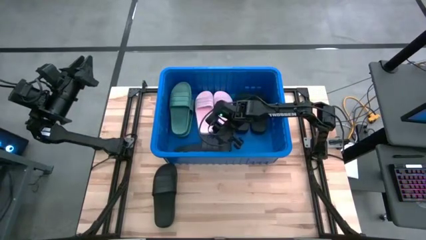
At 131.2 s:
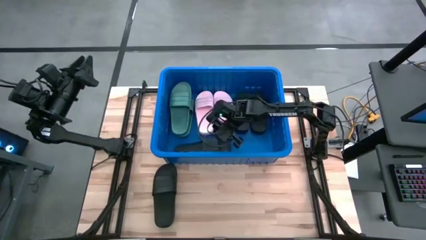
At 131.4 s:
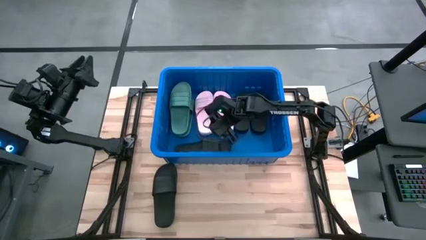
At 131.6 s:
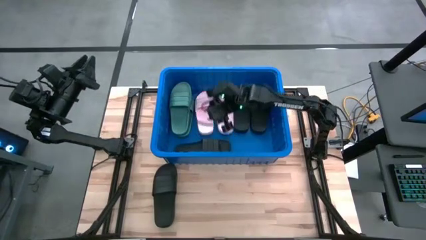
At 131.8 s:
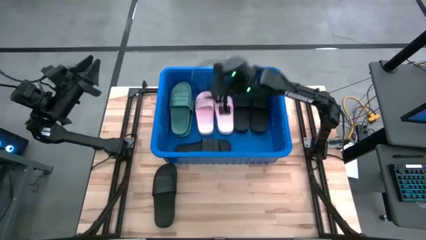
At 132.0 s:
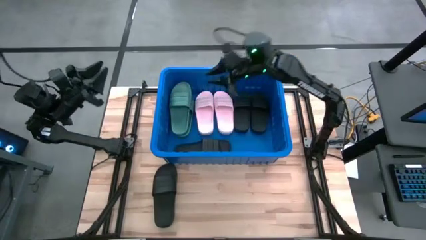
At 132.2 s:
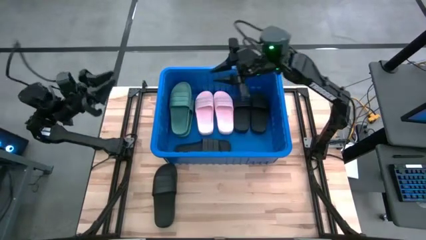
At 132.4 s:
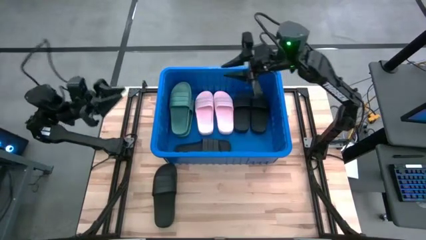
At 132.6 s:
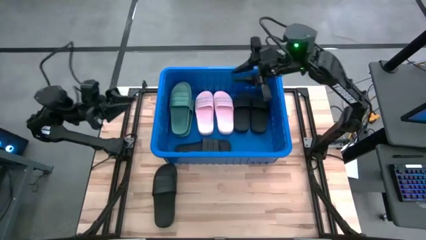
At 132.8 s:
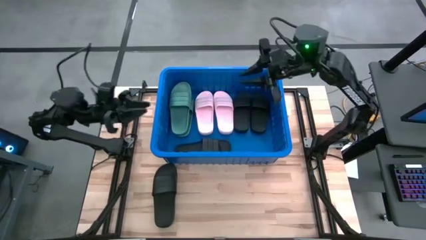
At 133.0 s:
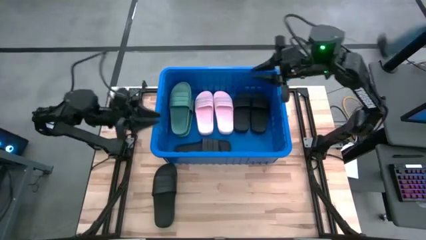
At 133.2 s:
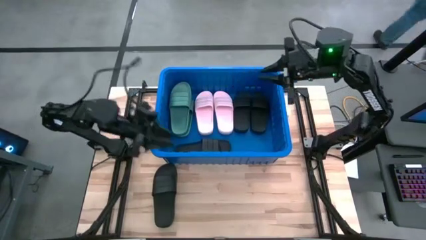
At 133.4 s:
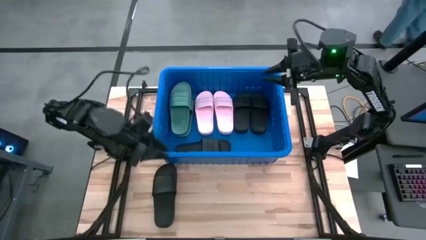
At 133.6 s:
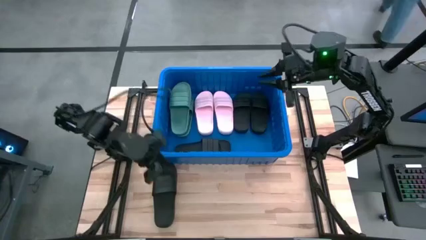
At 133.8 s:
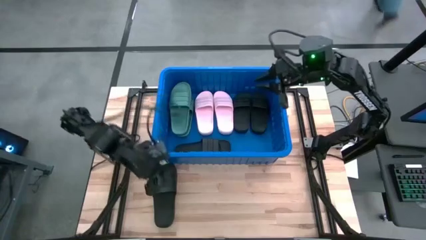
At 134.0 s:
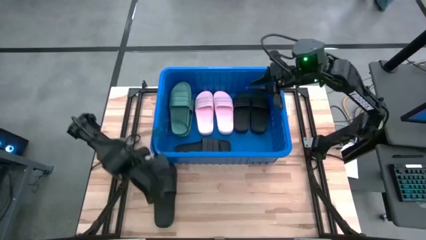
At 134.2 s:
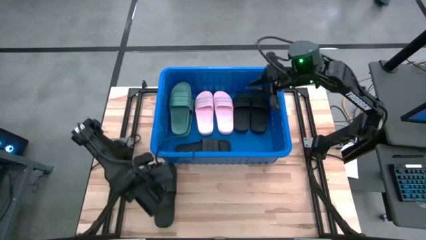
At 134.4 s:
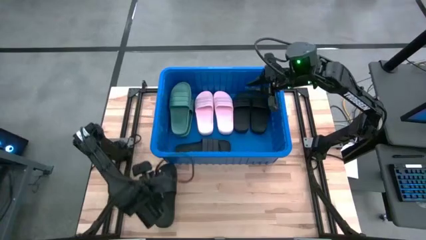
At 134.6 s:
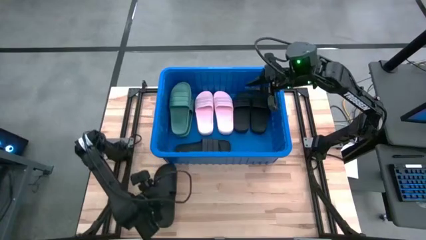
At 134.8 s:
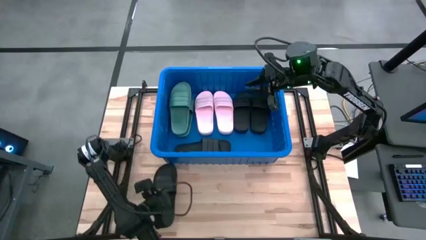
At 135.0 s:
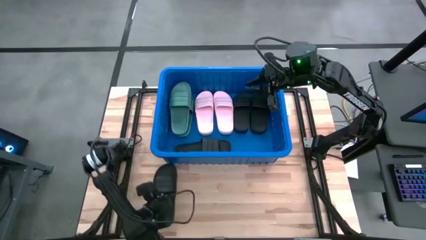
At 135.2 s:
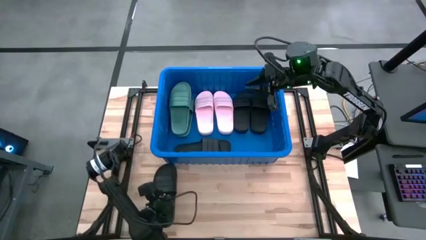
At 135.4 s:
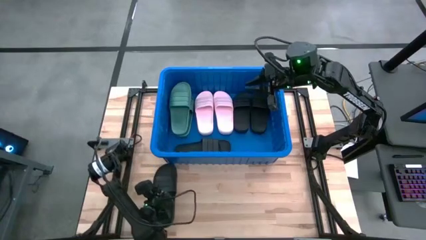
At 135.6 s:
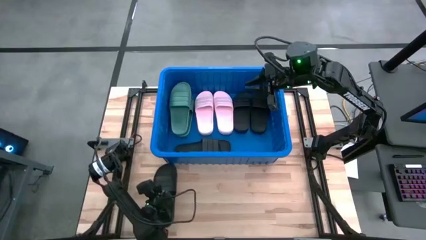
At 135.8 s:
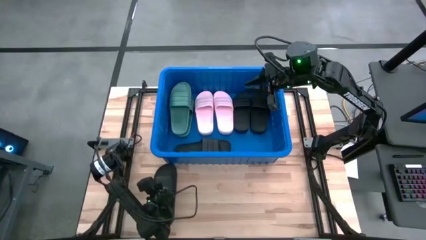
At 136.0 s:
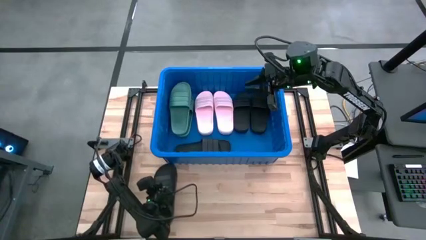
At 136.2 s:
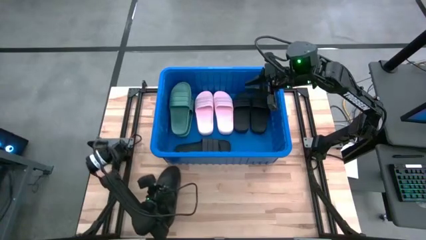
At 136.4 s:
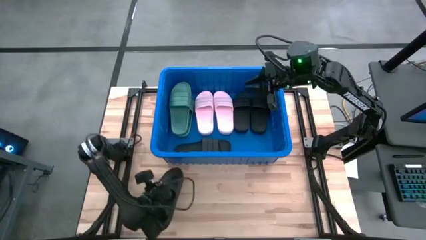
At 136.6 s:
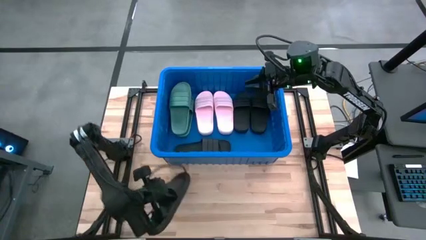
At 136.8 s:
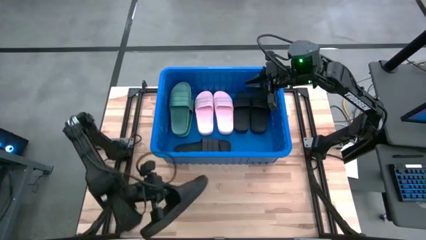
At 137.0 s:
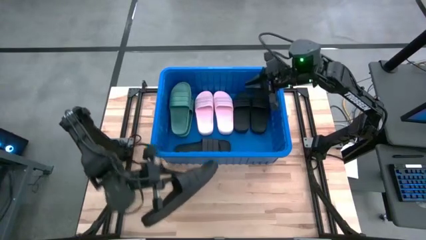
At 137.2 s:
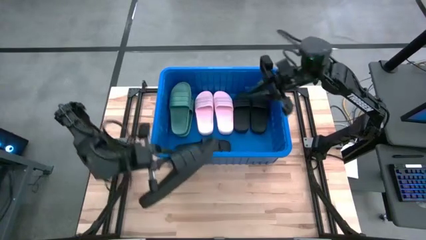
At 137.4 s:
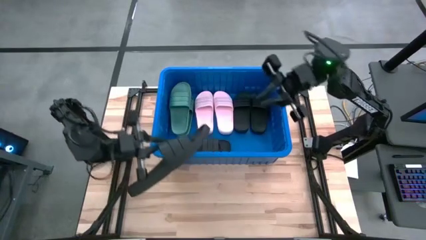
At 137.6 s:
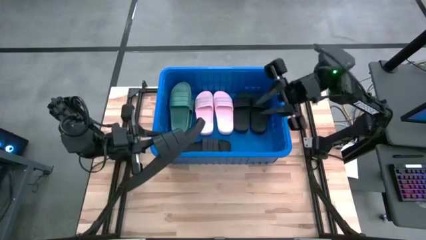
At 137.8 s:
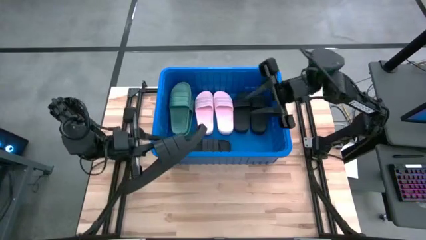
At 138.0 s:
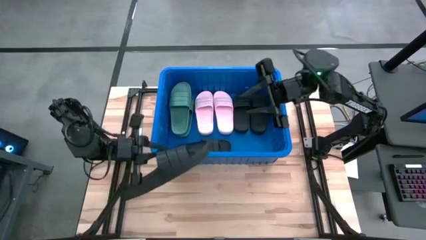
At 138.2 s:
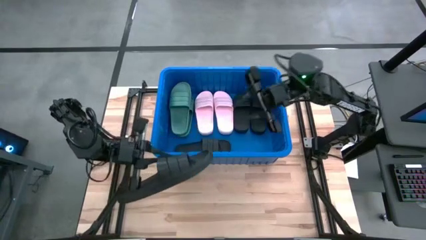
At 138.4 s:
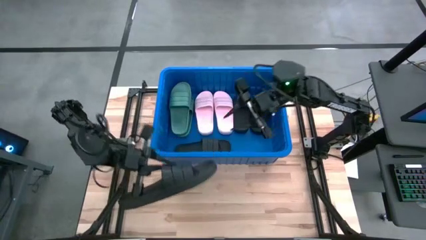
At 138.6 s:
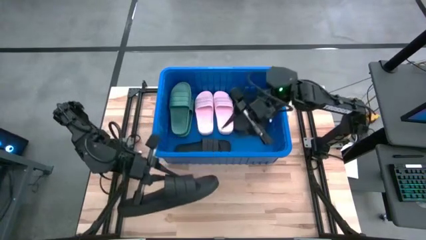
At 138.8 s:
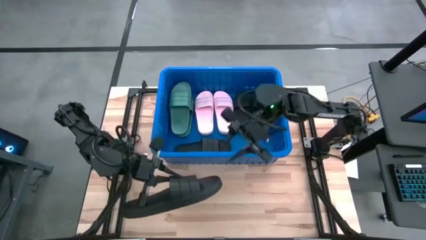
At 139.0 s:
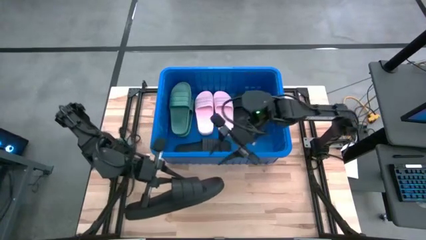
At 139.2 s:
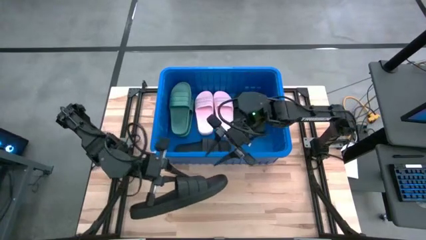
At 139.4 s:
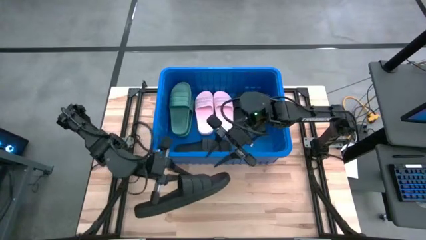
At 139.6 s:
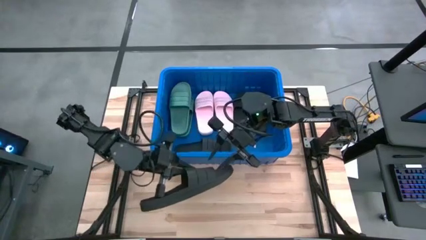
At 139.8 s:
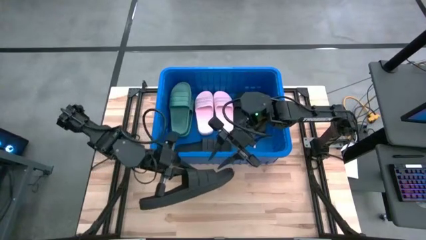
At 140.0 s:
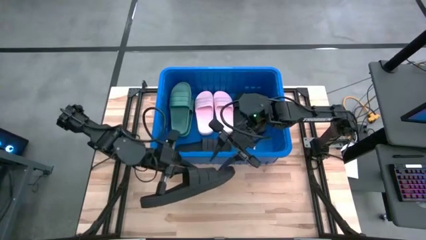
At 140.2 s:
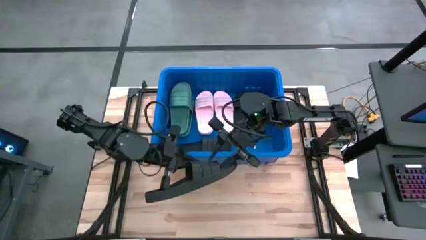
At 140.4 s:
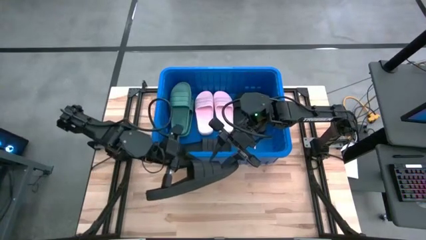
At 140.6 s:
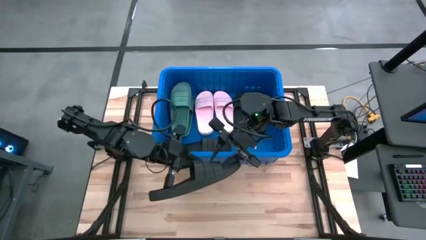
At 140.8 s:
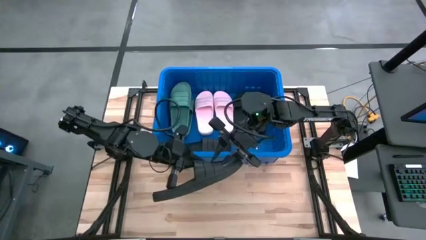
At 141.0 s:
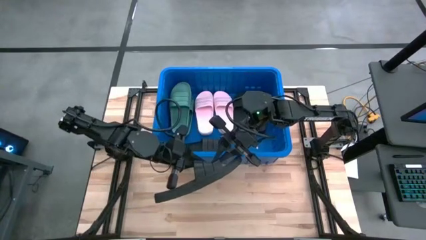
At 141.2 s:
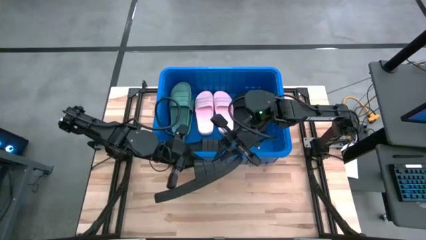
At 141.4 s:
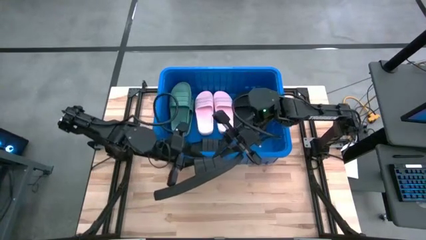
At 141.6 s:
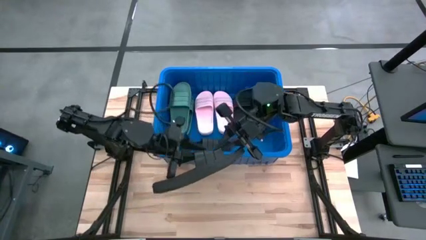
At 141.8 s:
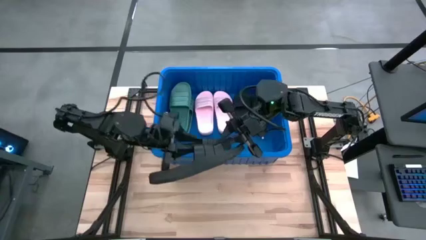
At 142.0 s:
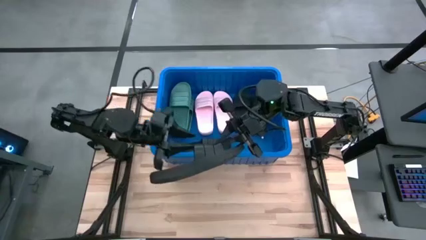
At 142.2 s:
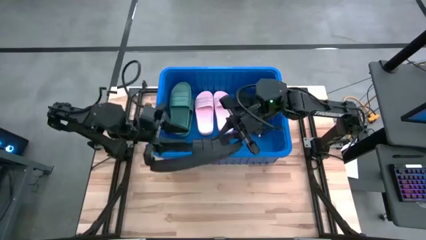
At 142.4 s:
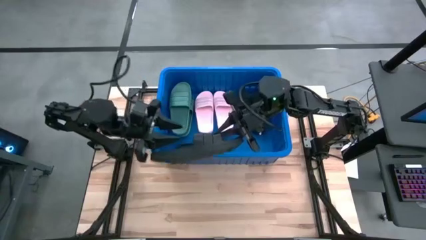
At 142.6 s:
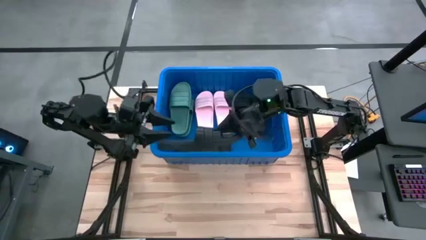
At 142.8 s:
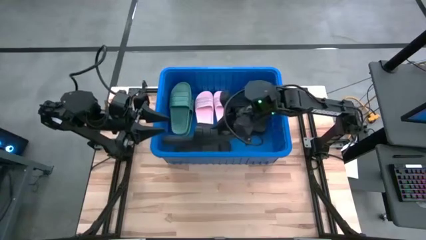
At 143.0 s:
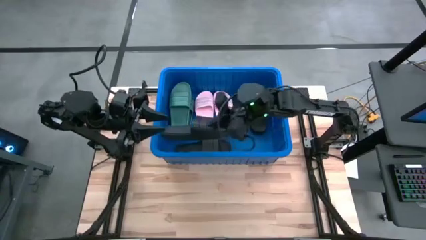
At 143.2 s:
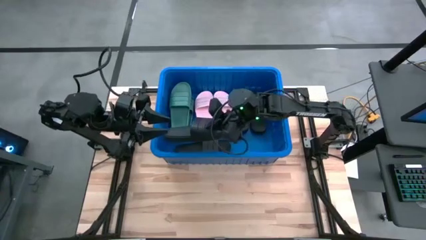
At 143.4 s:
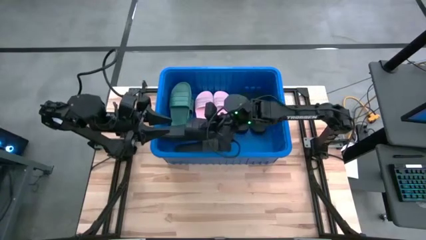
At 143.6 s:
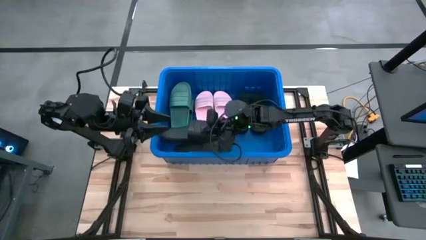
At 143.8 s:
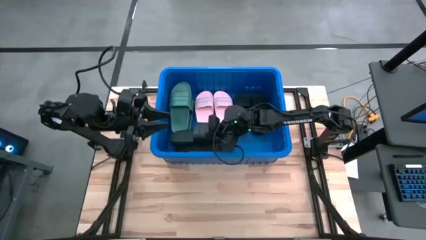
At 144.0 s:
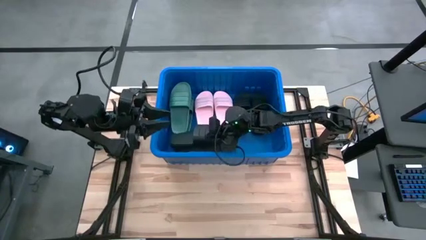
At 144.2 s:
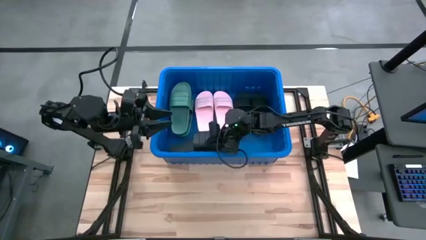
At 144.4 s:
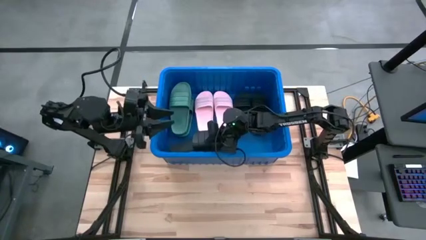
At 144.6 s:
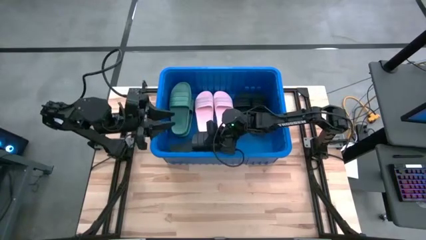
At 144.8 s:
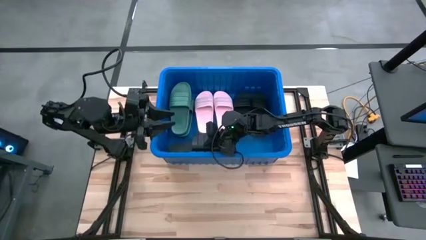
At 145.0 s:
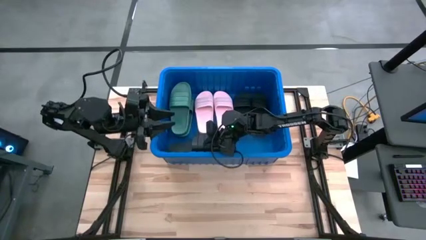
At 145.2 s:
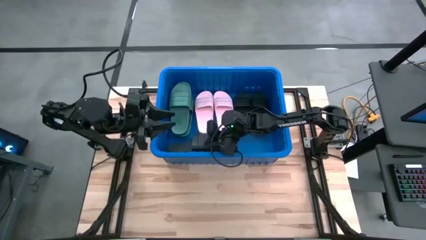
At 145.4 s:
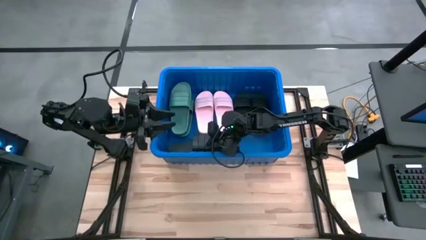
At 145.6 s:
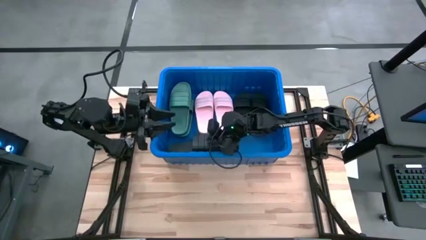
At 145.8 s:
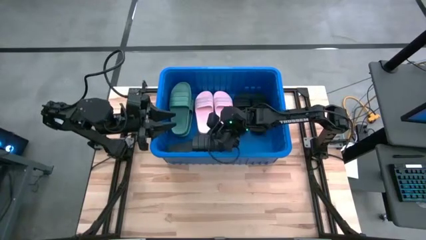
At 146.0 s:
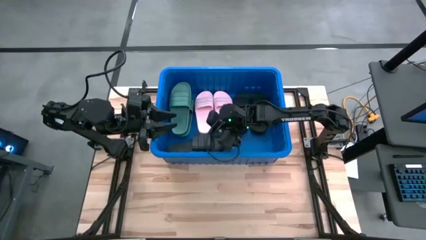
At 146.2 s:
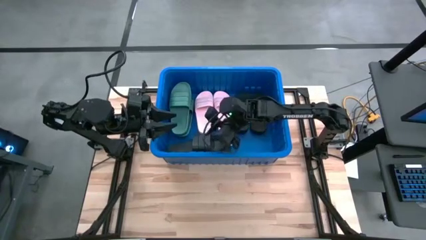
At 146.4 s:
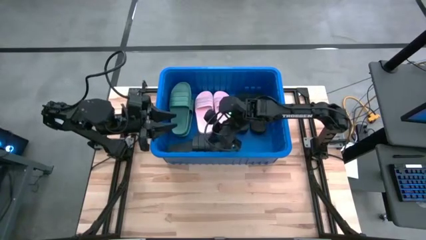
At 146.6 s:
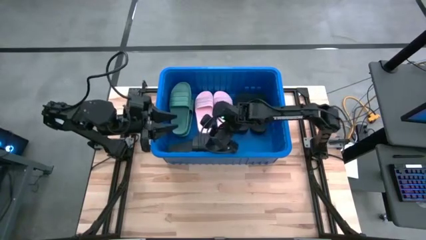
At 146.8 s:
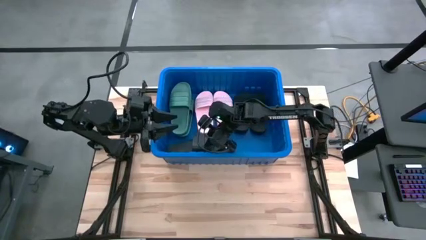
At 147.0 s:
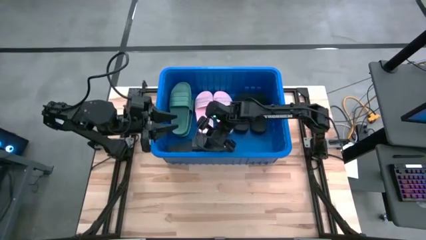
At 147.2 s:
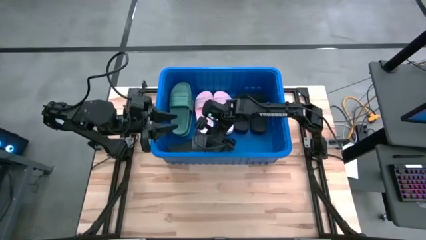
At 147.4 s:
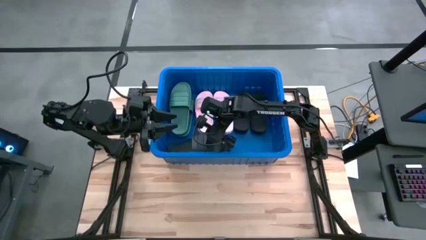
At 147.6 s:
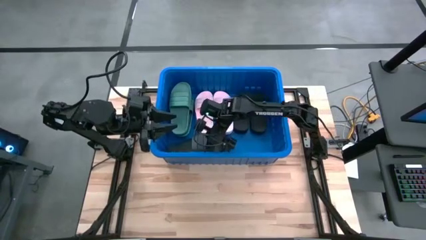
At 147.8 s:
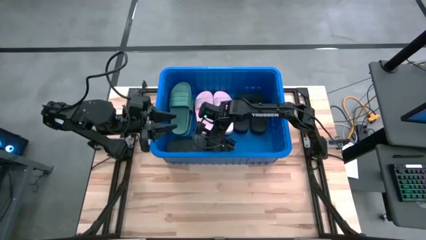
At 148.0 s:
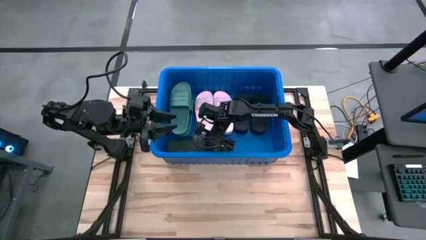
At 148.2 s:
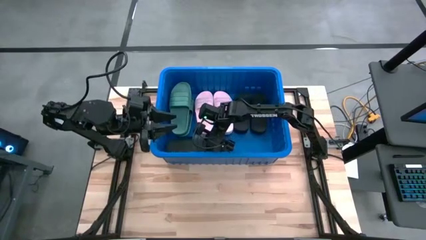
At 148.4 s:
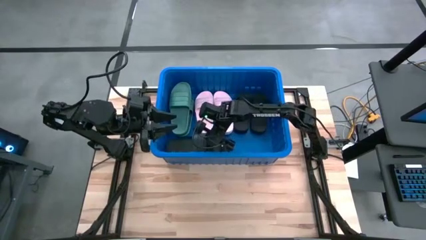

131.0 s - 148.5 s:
Task: Pick and place slides into bin
Put the black slipper into the blue bin
